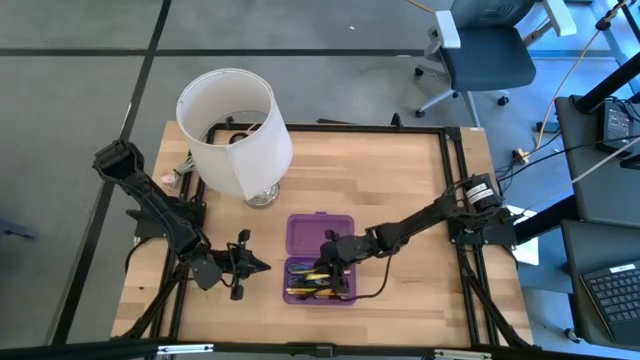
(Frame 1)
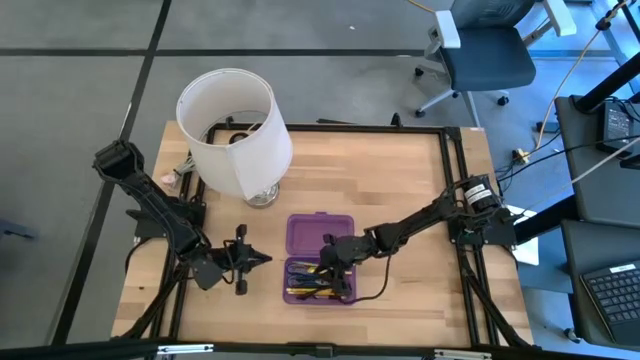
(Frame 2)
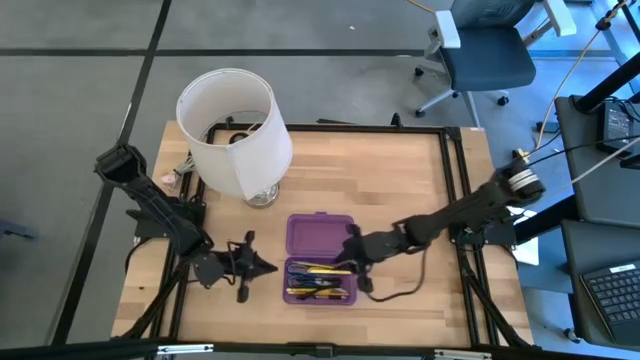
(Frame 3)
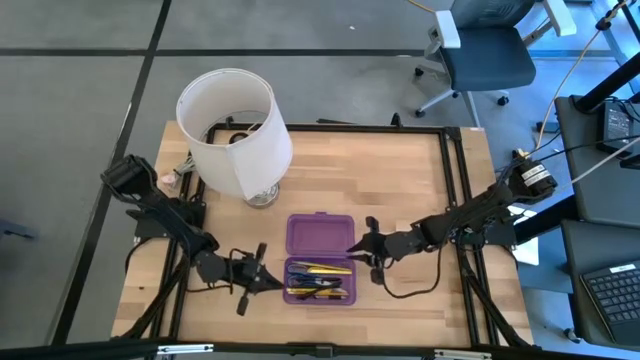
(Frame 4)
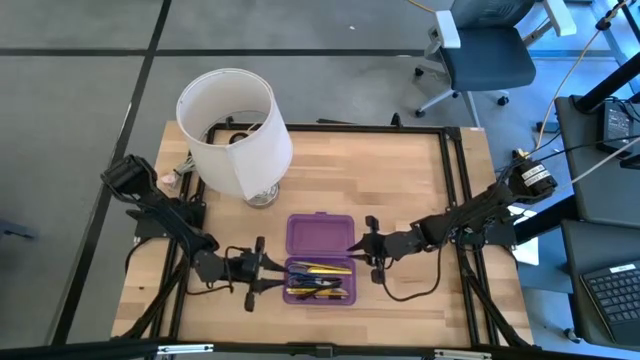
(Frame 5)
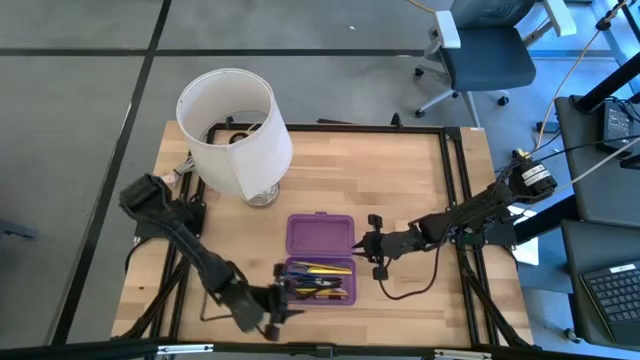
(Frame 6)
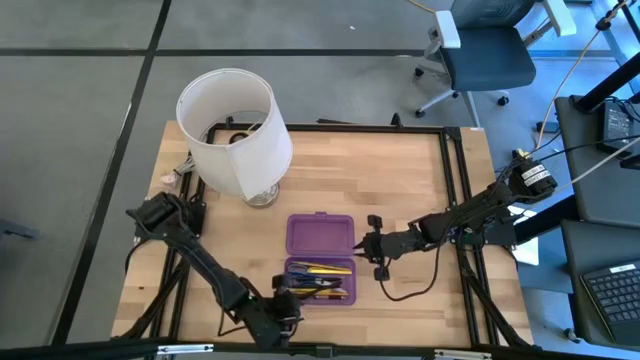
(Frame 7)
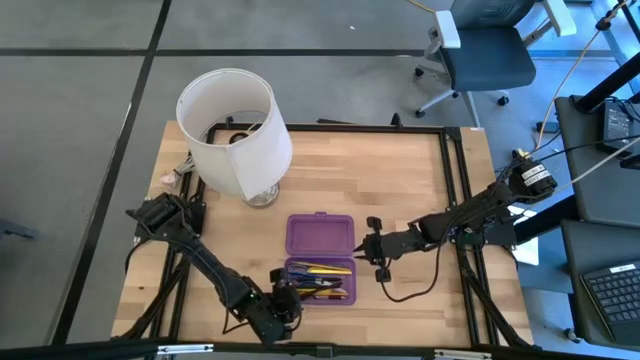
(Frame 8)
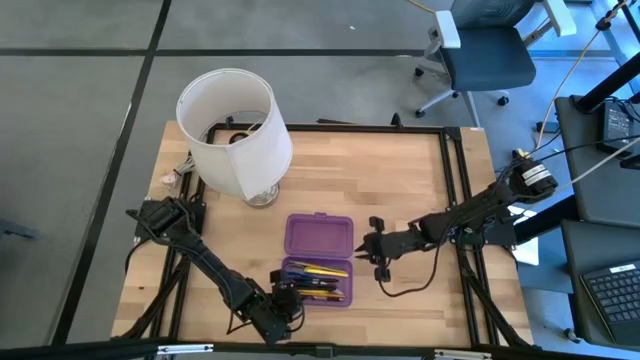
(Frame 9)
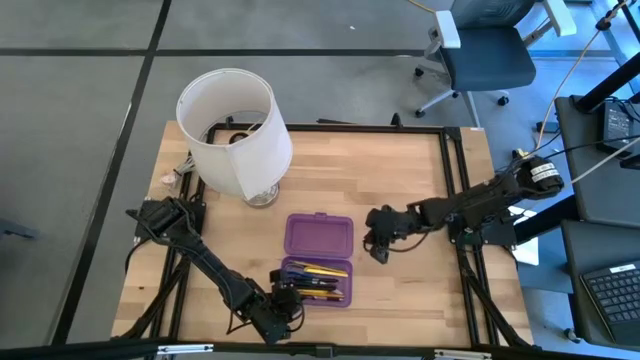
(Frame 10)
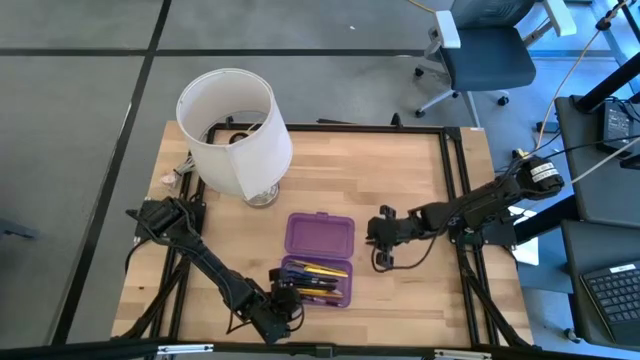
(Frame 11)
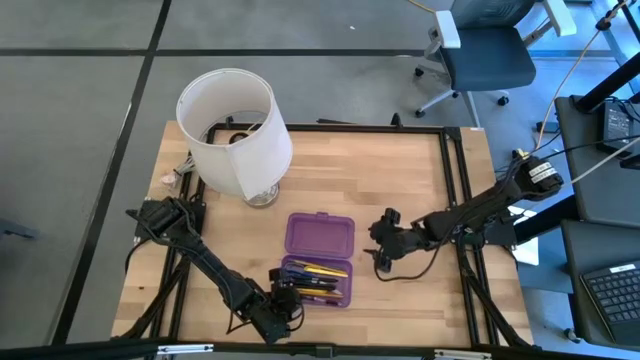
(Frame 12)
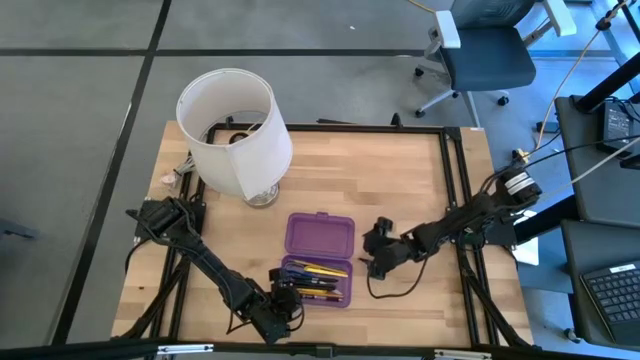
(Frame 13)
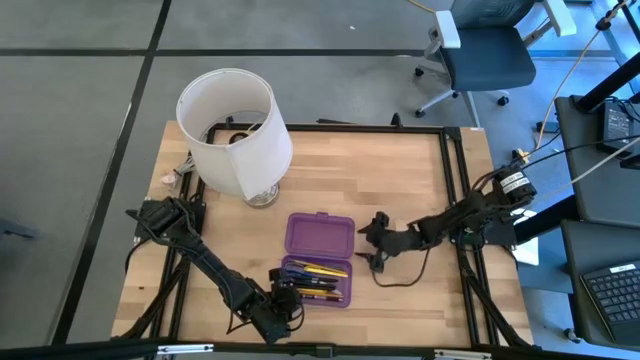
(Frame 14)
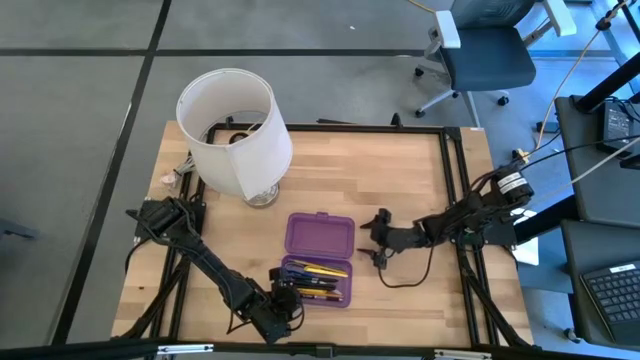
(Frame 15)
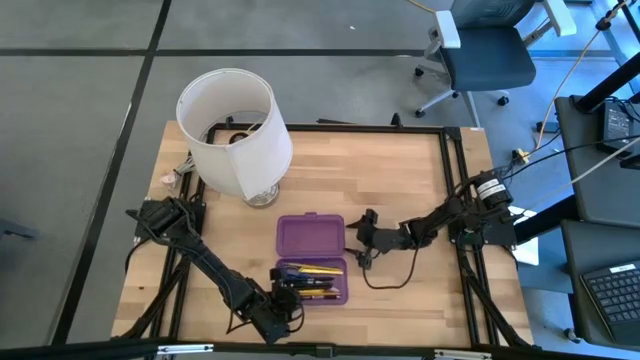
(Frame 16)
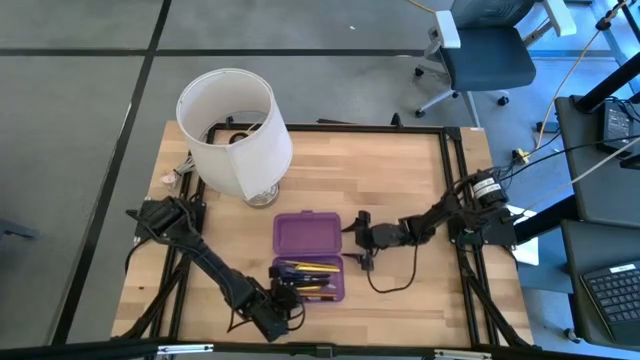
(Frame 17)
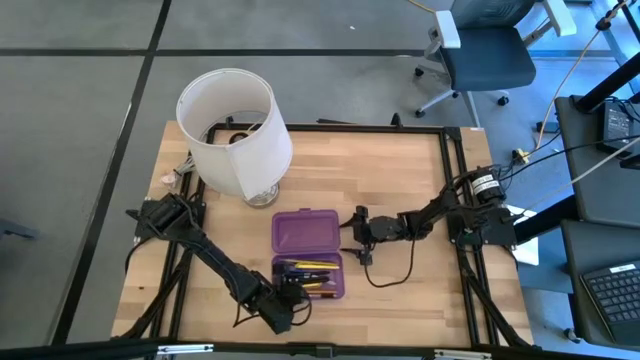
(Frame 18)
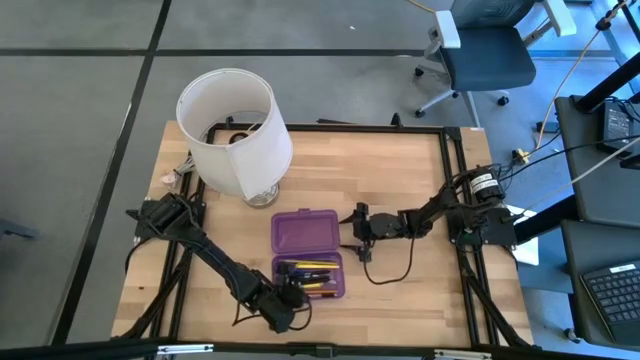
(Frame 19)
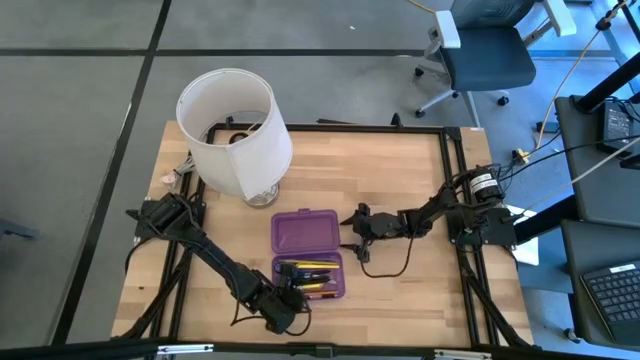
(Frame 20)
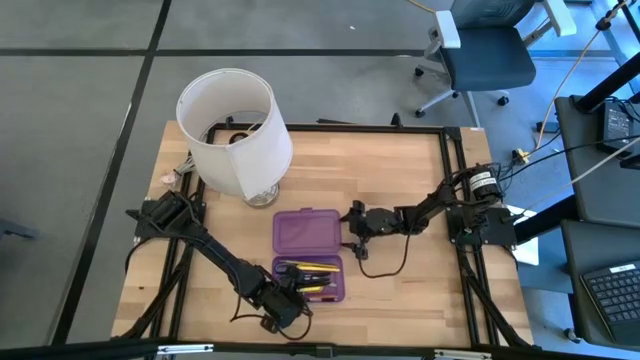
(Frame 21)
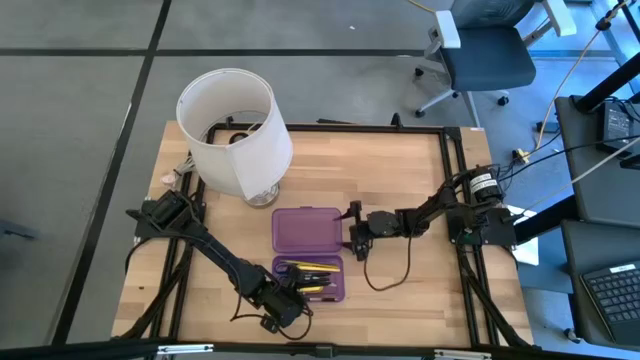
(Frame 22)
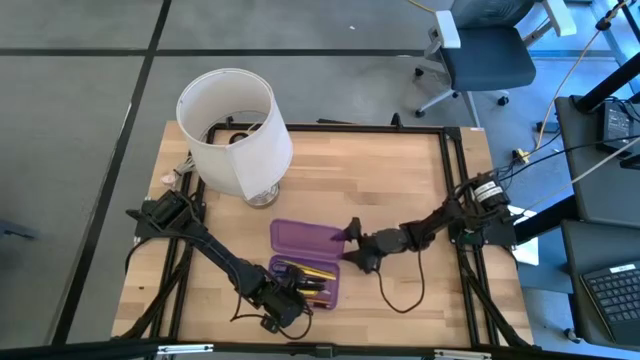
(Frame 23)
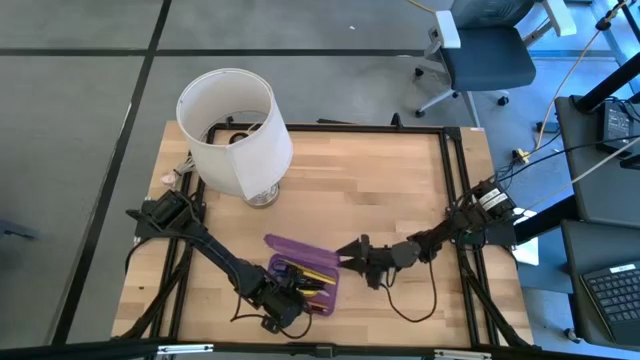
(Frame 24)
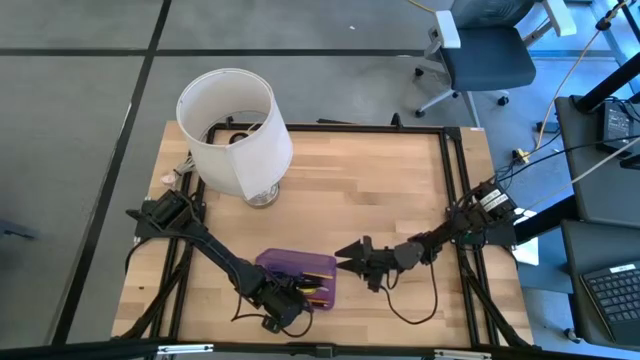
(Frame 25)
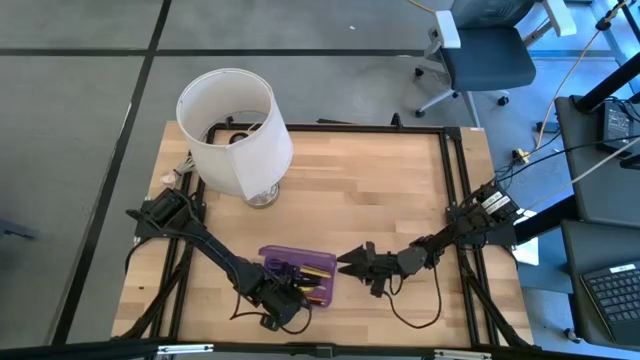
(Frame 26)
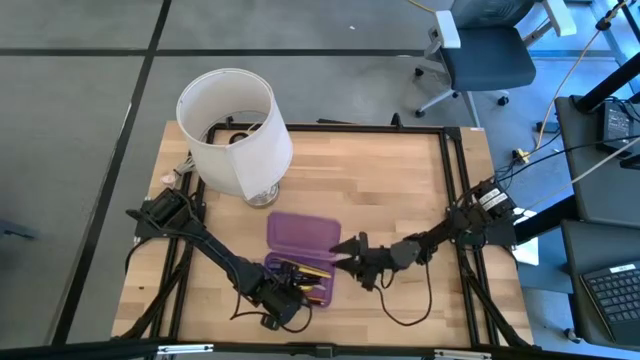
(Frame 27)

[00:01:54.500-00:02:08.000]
Task: Pick & place school supplies into a supply box
Close the purple supply box

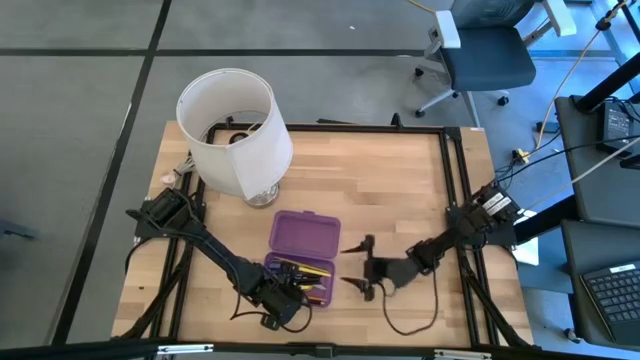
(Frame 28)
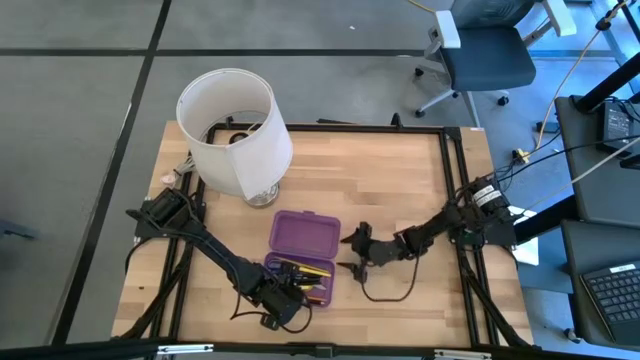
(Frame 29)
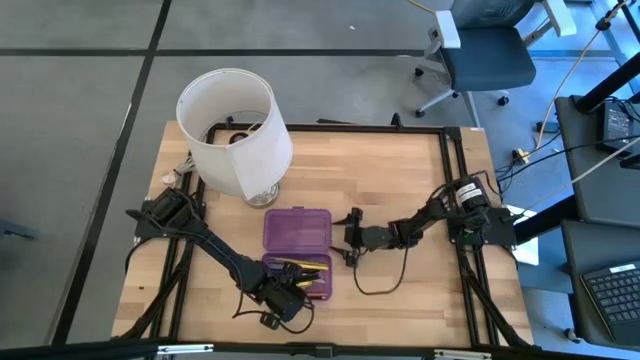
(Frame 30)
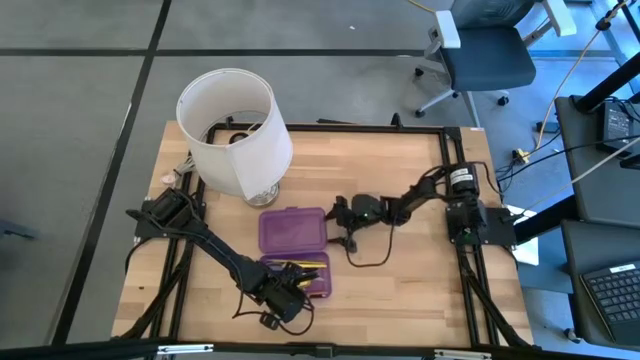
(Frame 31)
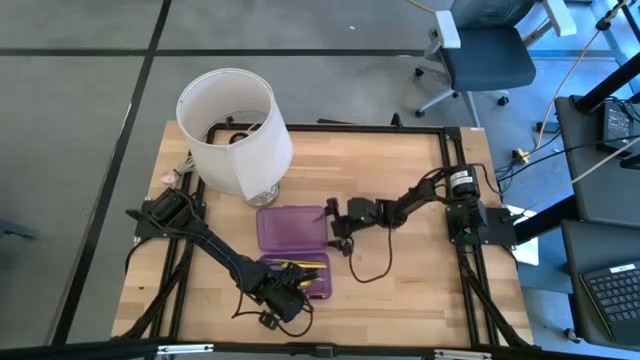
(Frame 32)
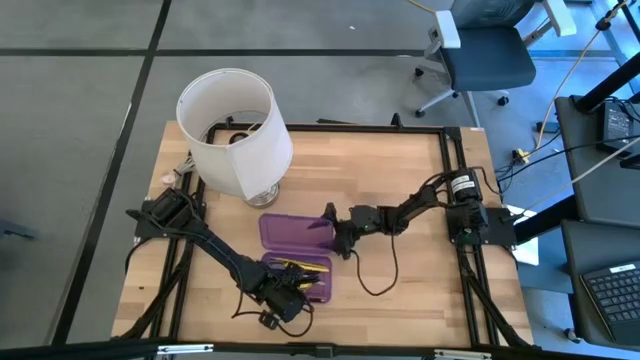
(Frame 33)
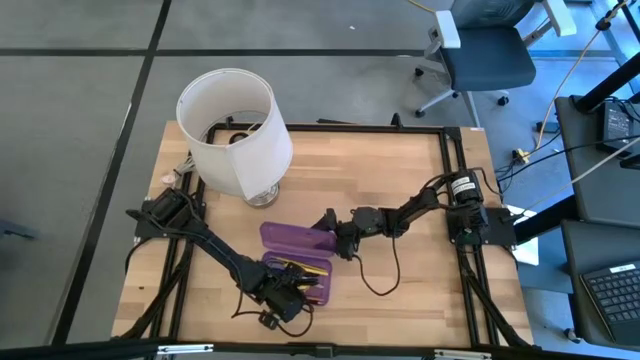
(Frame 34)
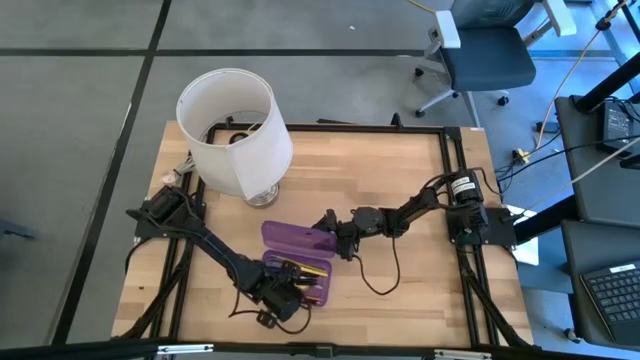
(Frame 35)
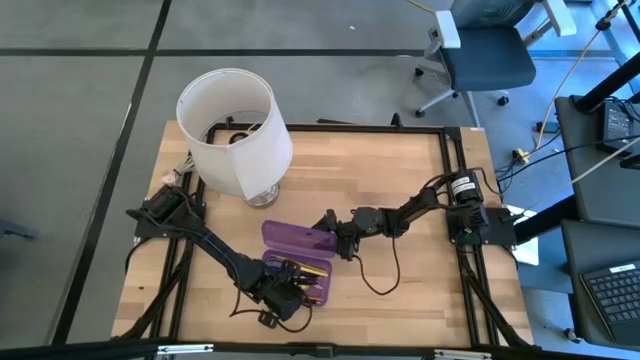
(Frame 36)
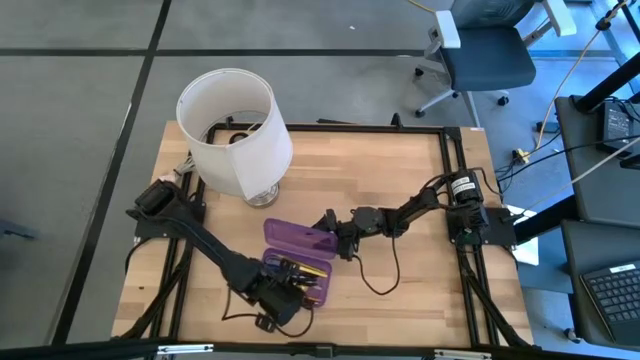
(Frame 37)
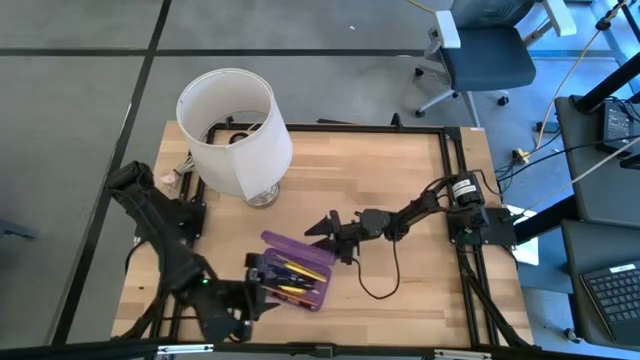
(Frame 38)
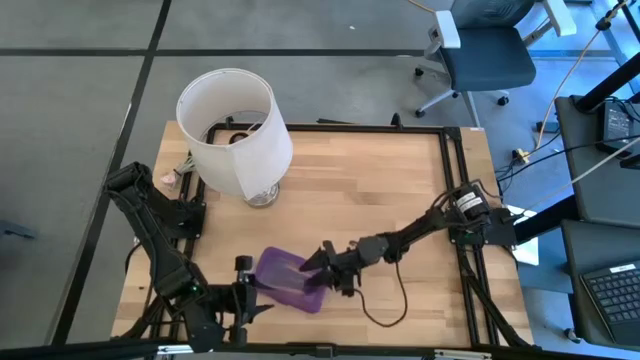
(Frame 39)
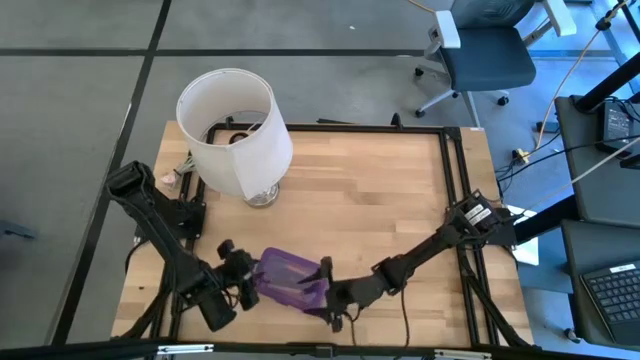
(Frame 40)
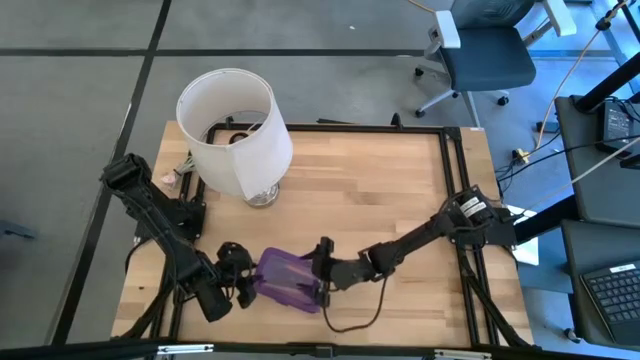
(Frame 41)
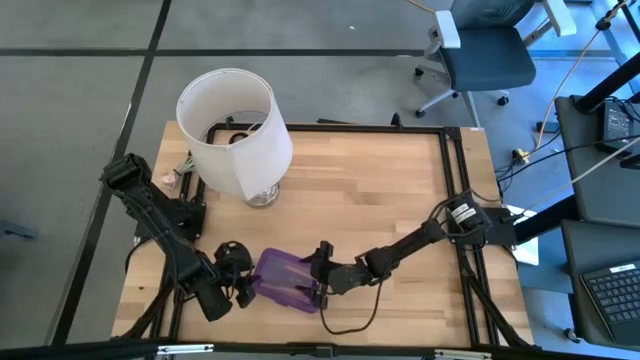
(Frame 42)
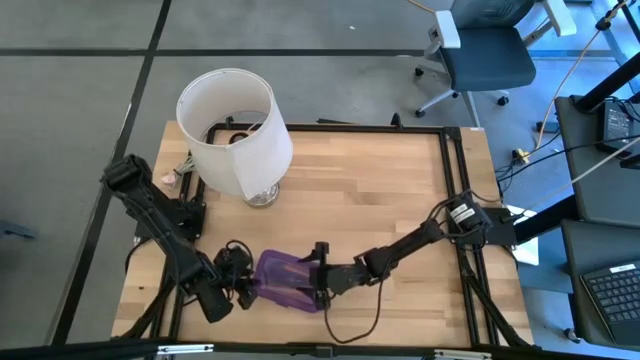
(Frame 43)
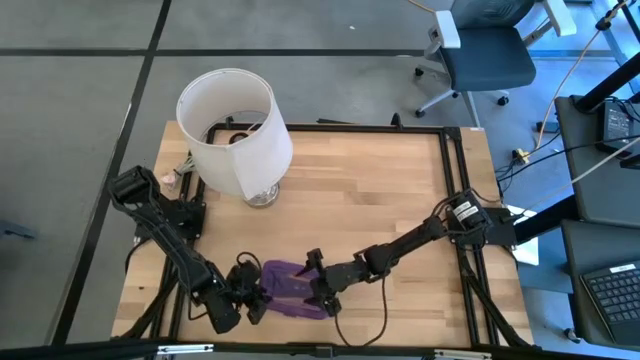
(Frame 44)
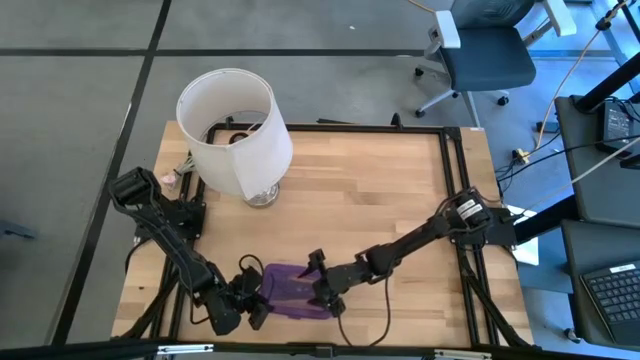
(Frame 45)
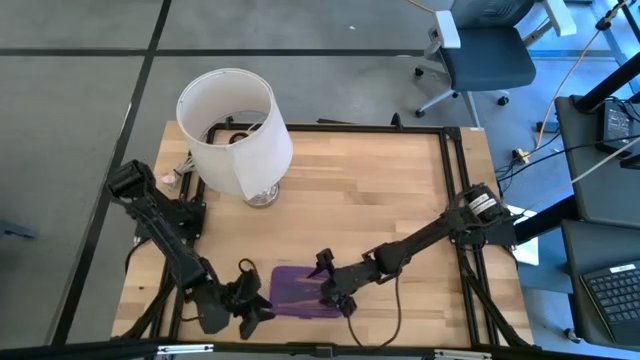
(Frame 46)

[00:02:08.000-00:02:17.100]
Close the purple supply box
